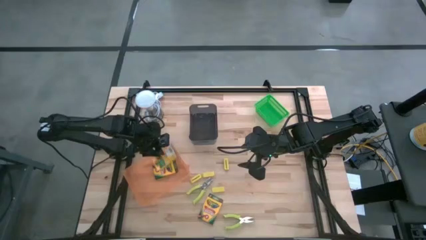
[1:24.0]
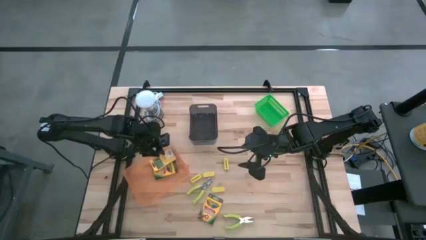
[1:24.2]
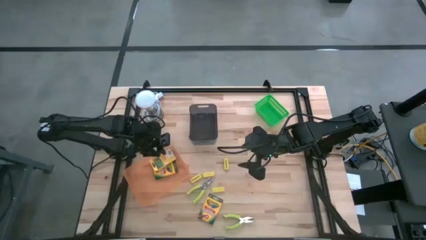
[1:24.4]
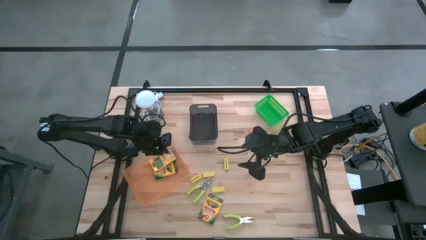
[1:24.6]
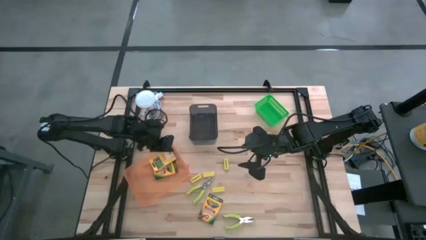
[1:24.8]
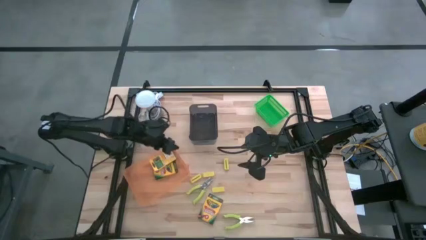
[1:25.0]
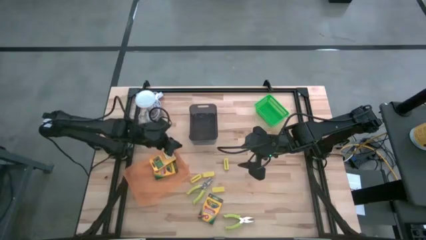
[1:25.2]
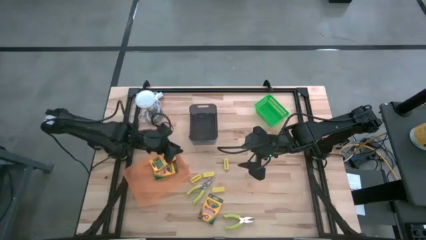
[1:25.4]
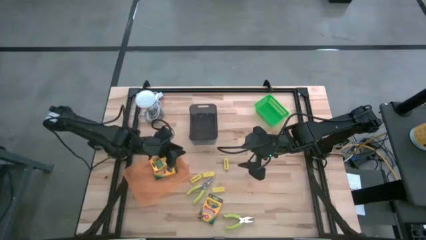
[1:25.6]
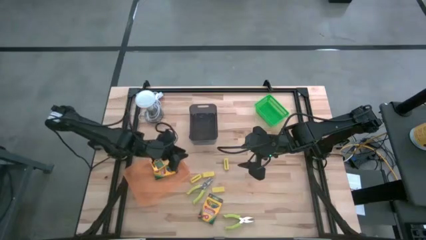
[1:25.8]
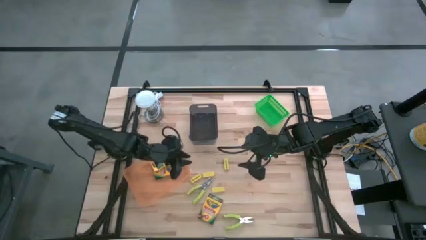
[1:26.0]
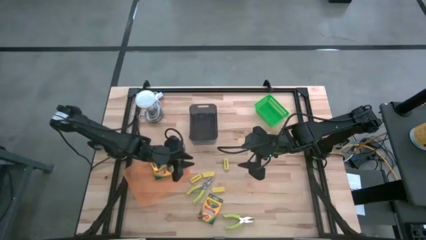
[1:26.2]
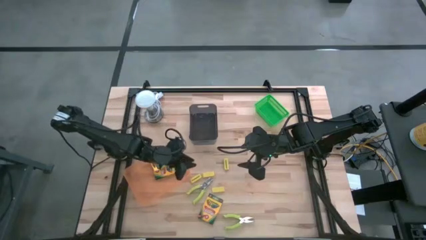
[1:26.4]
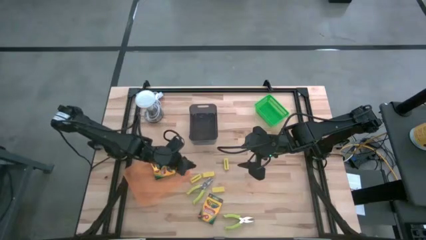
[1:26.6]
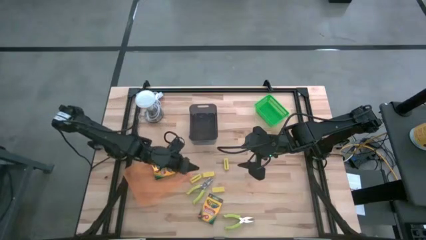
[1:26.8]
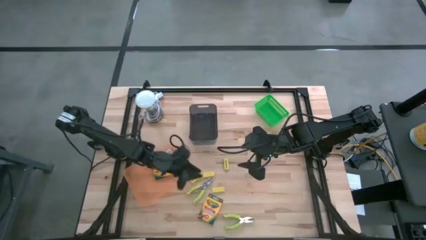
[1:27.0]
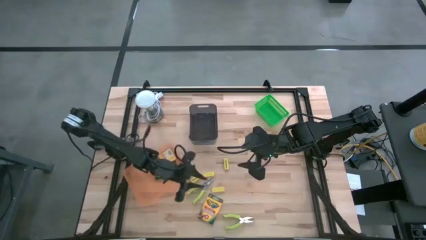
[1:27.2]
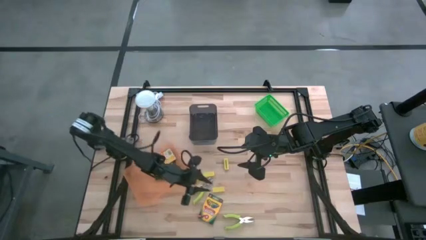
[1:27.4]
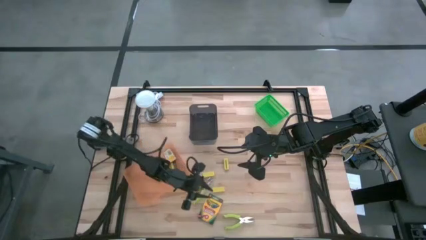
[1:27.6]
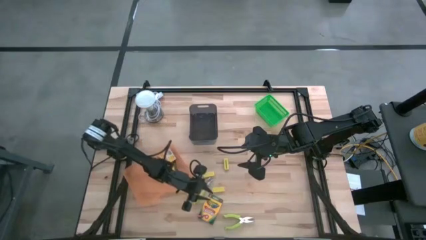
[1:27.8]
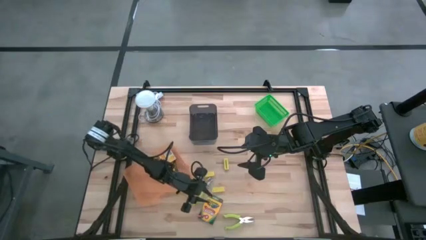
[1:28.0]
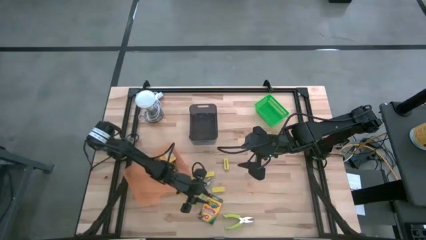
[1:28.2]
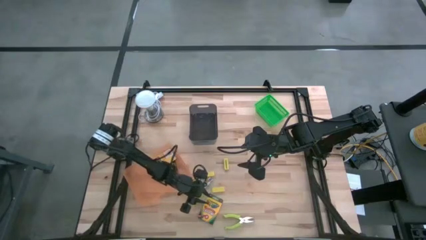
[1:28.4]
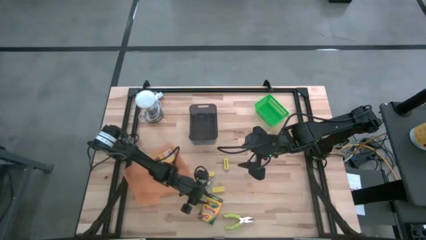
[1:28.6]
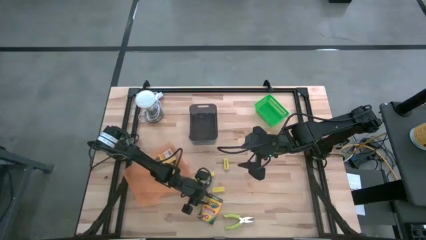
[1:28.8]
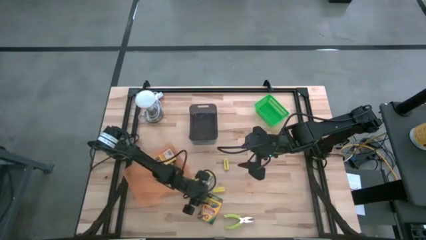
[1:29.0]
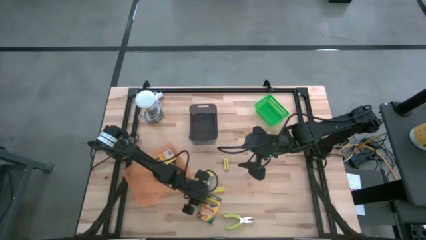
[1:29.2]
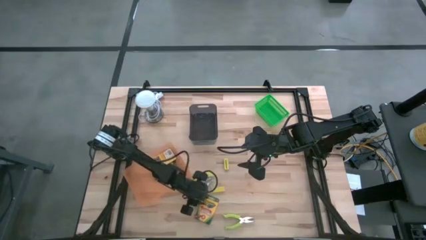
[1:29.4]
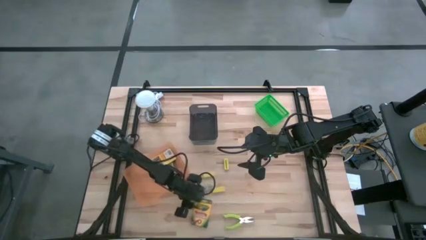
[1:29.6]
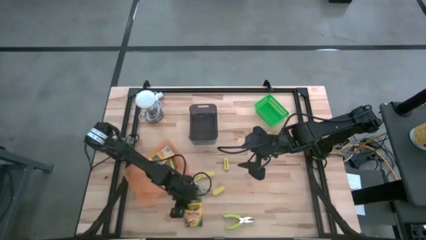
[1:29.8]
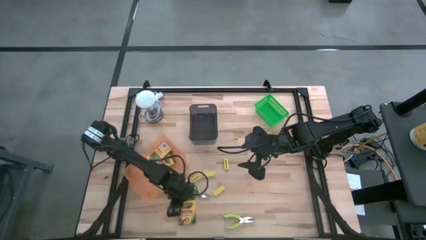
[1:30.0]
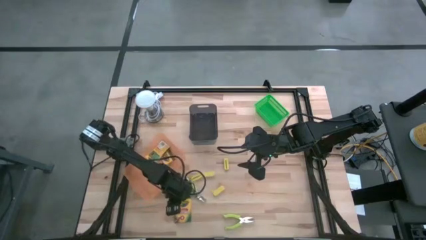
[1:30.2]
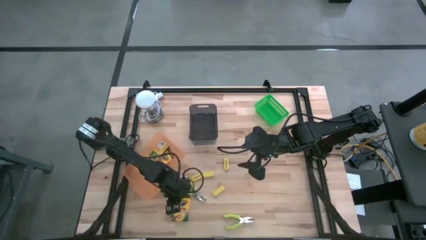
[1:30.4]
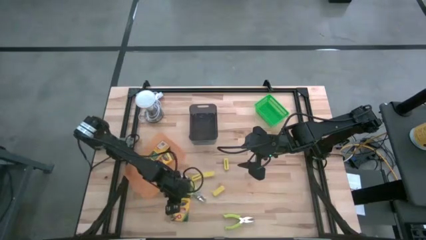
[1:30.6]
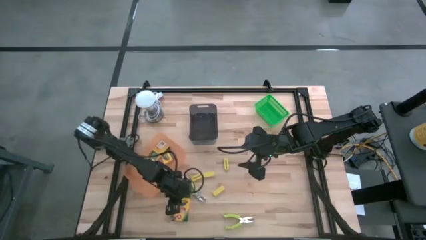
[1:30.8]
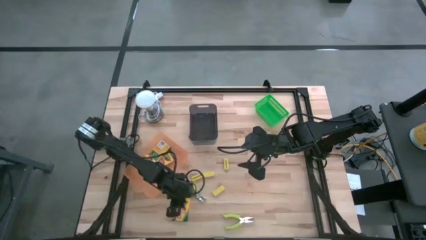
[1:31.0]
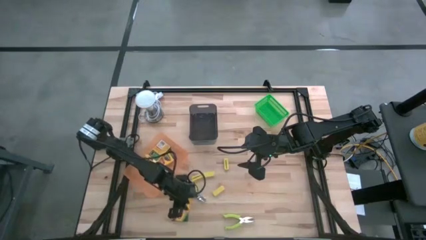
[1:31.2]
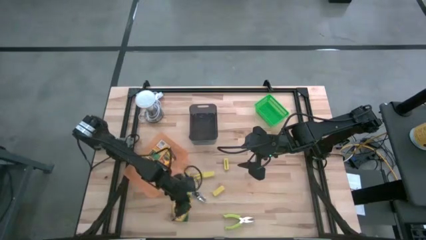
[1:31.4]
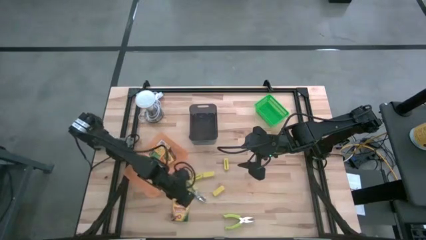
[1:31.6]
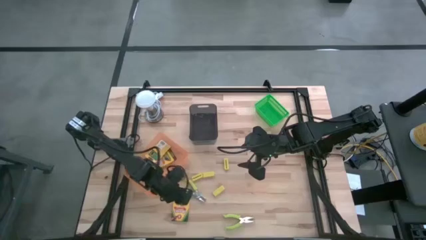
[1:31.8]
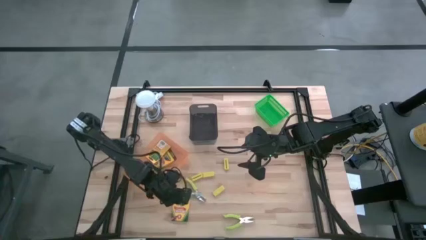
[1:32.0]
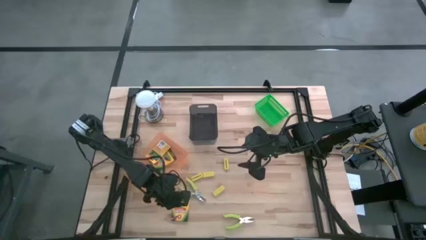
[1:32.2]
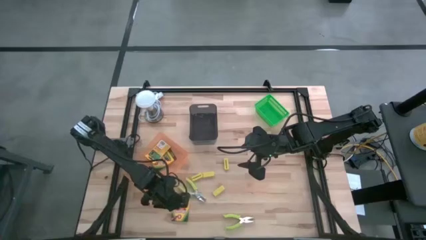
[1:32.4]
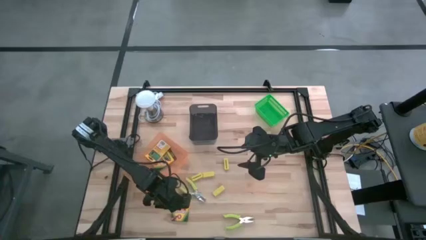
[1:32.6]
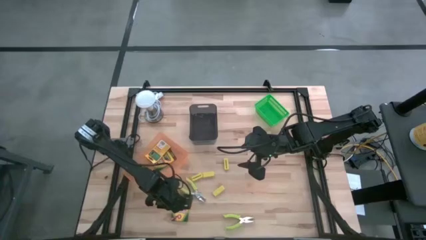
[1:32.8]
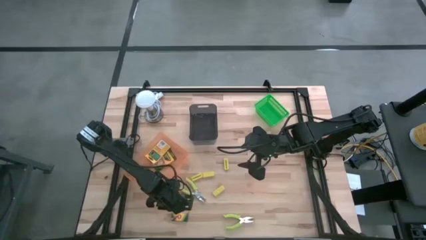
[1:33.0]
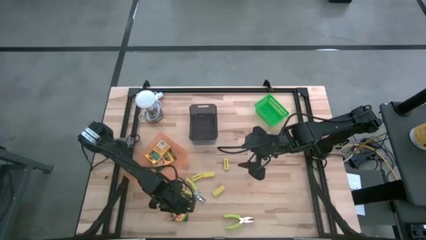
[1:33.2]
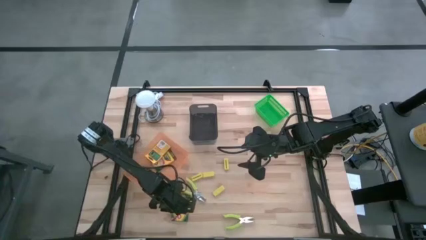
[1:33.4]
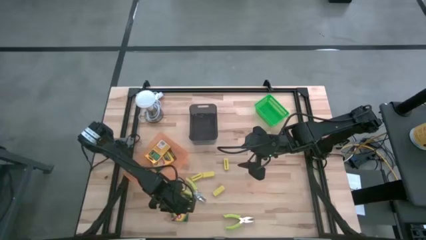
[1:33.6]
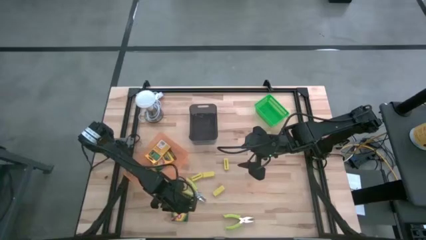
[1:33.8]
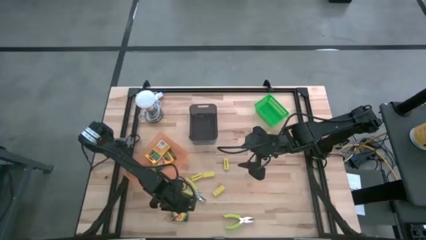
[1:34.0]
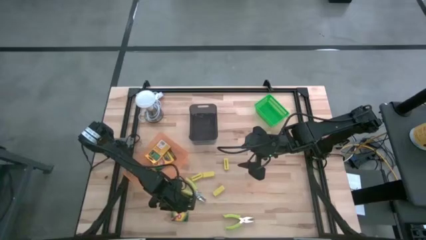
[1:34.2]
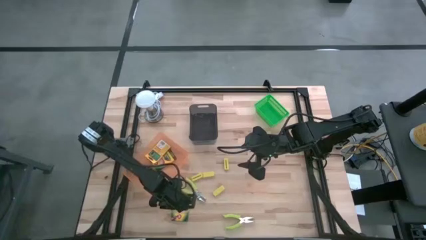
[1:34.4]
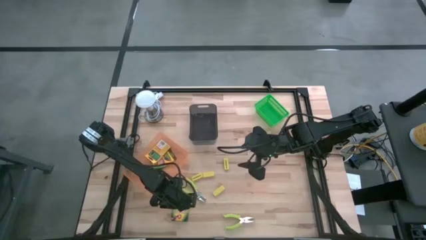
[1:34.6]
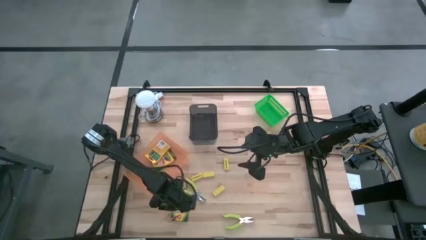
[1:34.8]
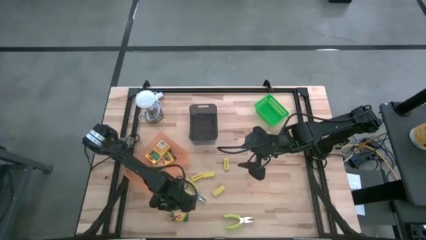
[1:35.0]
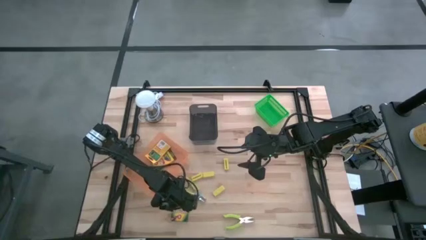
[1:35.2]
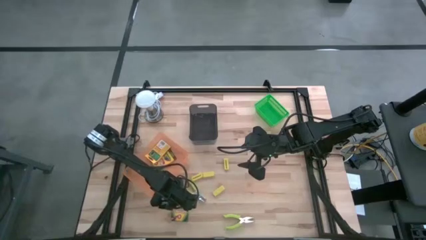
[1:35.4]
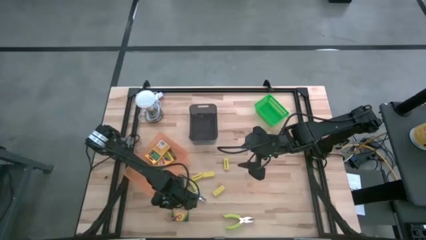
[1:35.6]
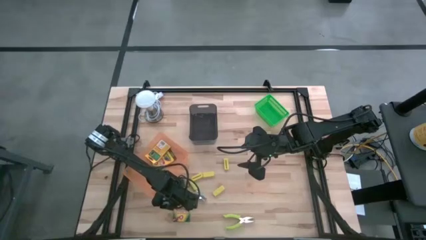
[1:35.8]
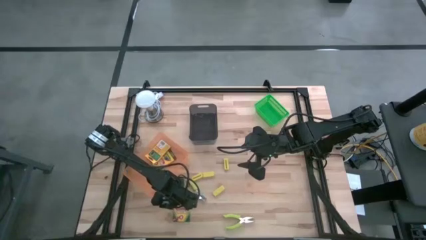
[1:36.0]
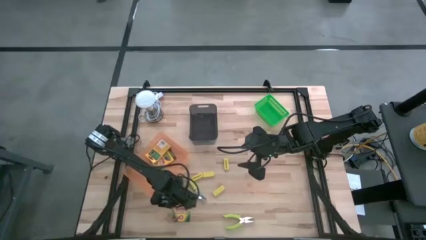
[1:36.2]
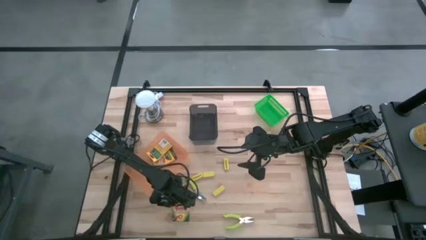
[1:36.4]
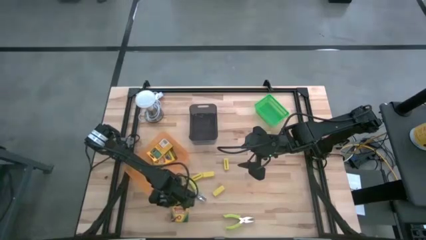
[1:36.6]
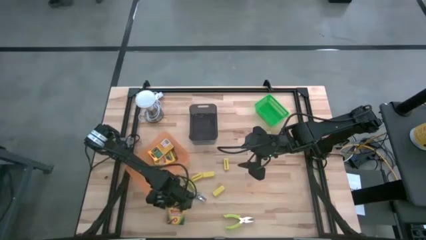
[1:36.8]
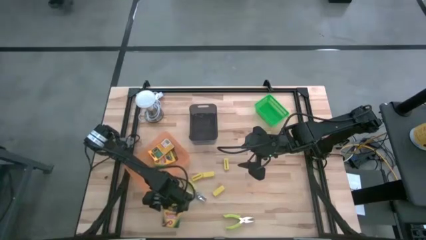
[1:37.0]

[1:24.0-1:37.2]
Task: Pick & Place School Supplies
Put the pack of crayons into the orange bin
